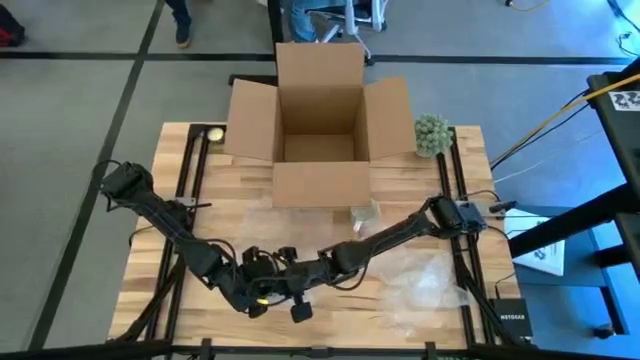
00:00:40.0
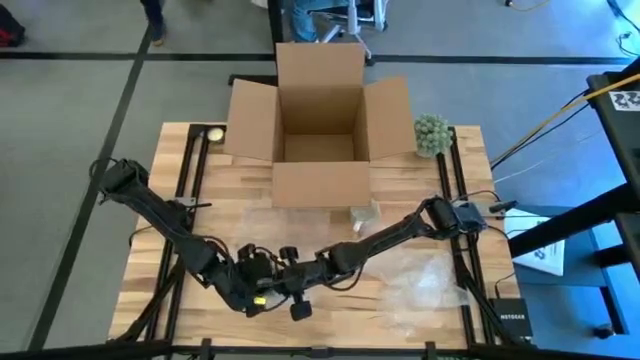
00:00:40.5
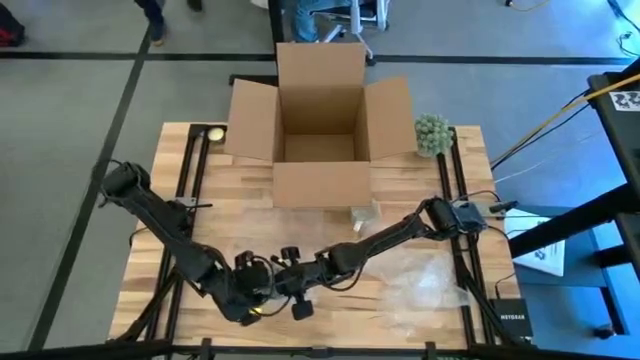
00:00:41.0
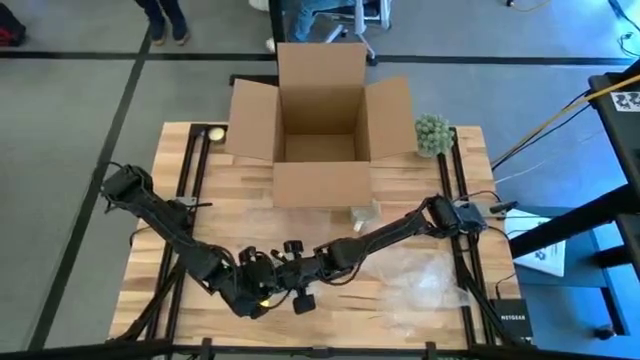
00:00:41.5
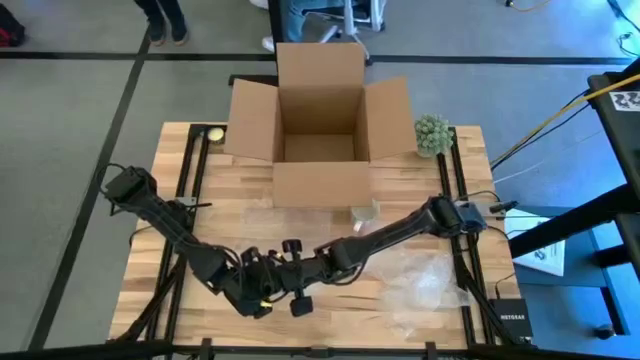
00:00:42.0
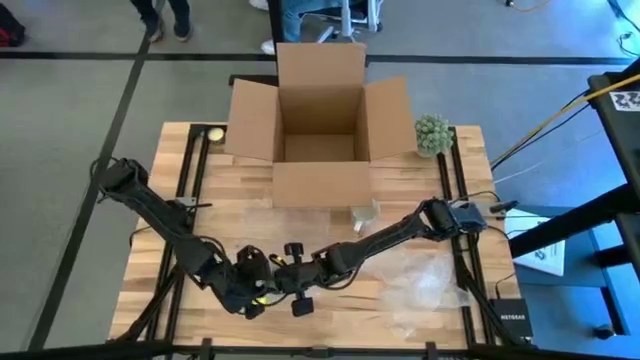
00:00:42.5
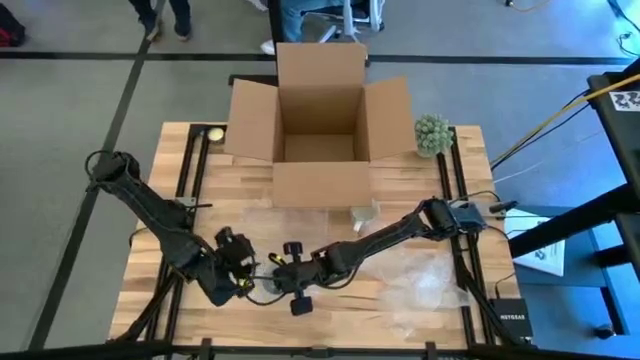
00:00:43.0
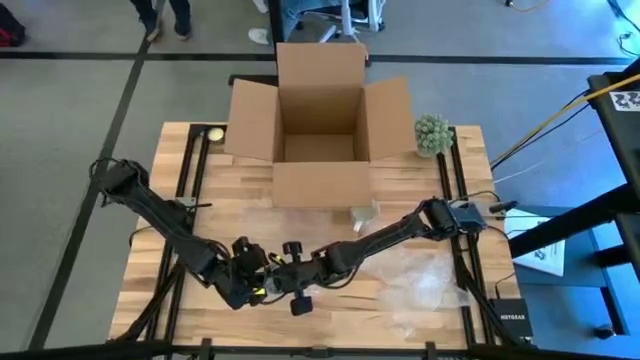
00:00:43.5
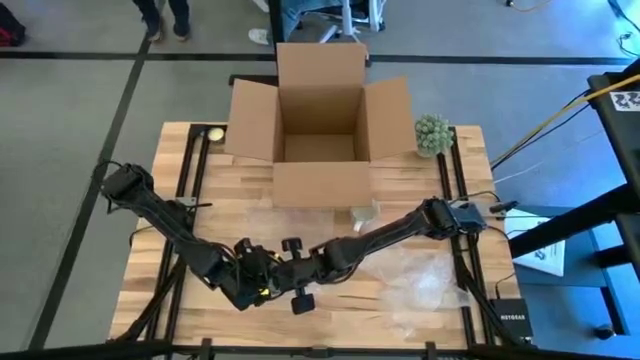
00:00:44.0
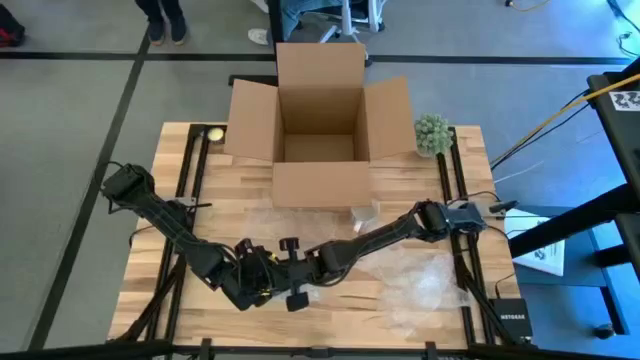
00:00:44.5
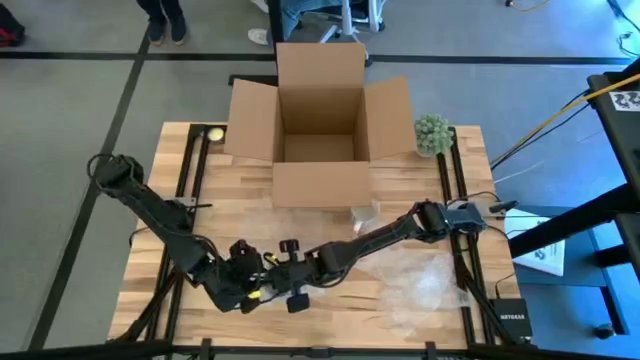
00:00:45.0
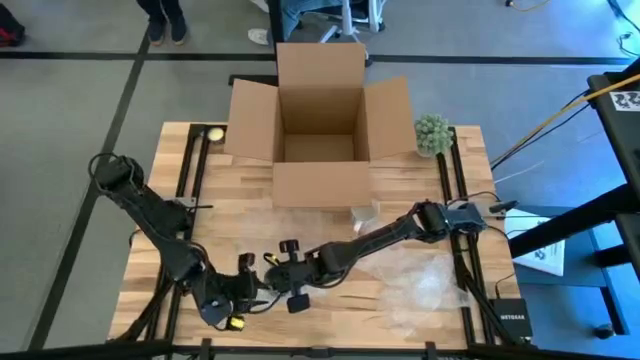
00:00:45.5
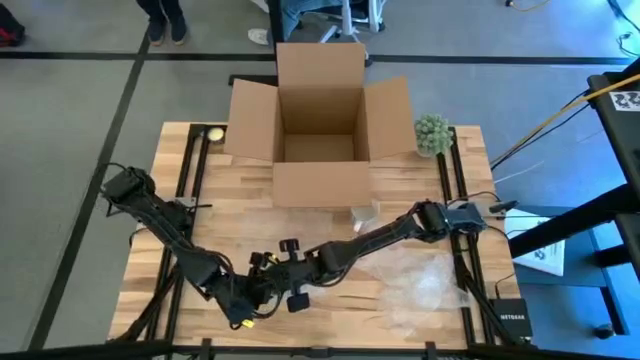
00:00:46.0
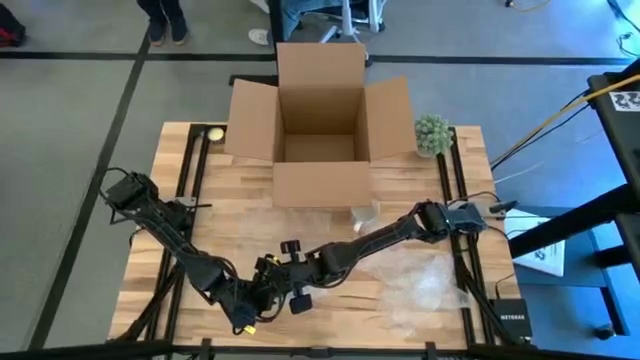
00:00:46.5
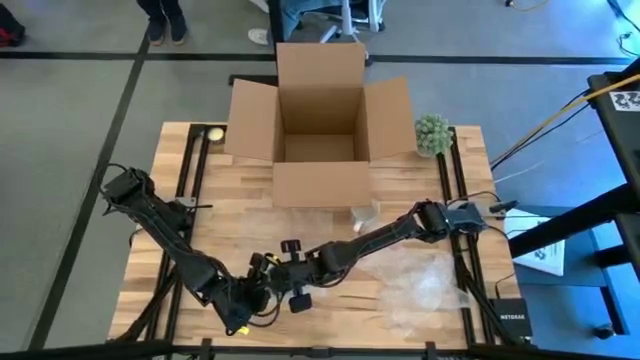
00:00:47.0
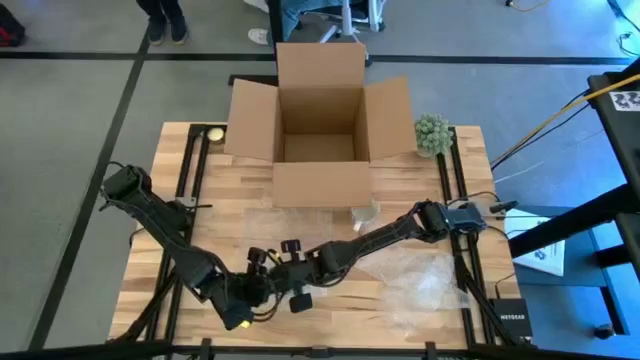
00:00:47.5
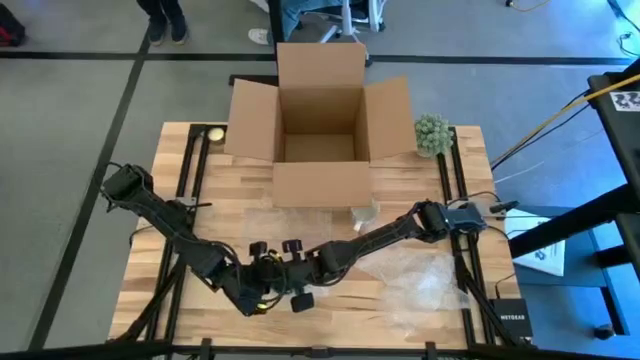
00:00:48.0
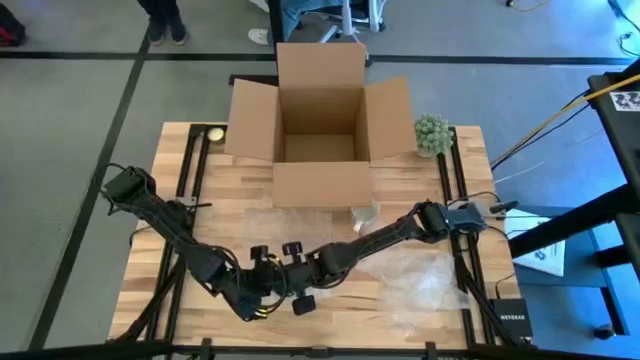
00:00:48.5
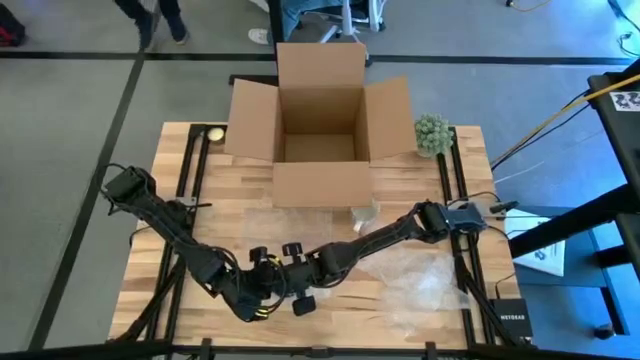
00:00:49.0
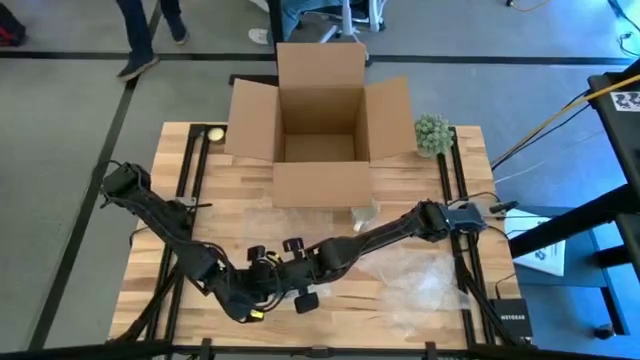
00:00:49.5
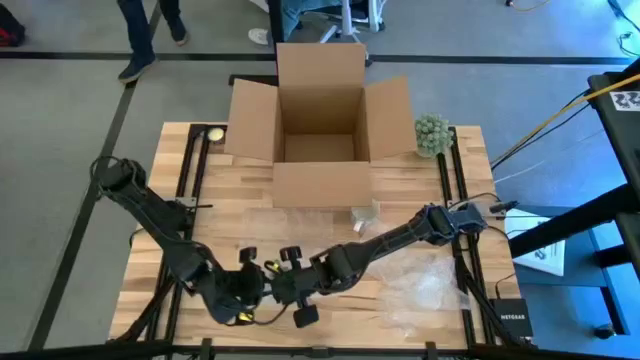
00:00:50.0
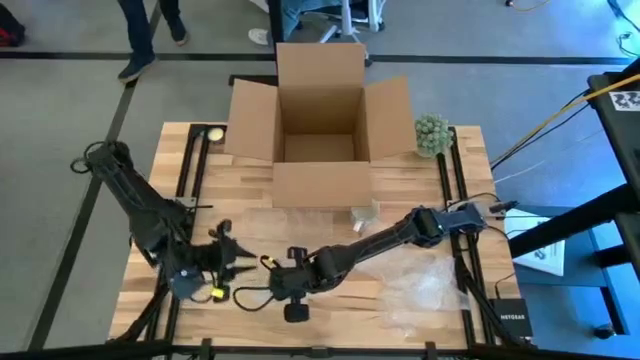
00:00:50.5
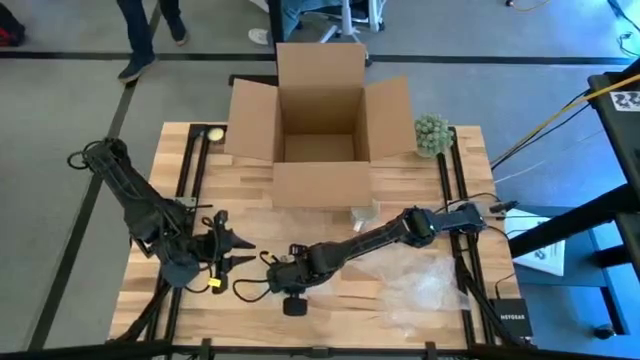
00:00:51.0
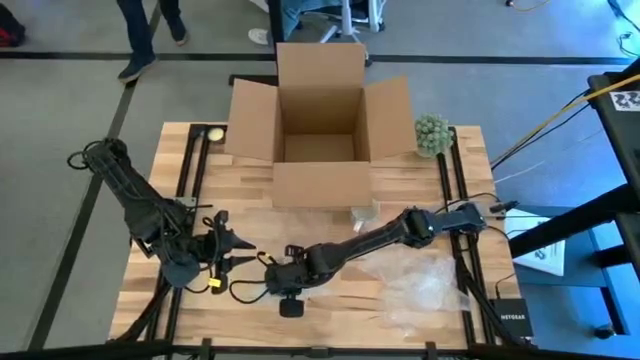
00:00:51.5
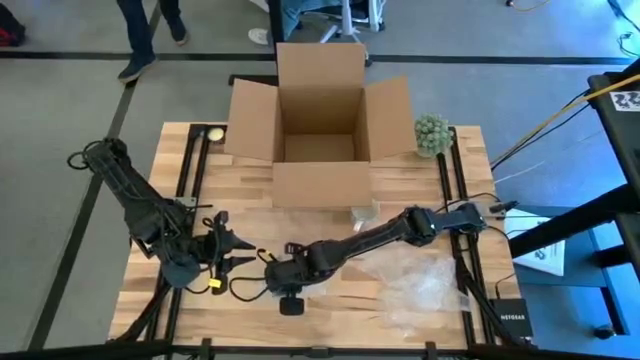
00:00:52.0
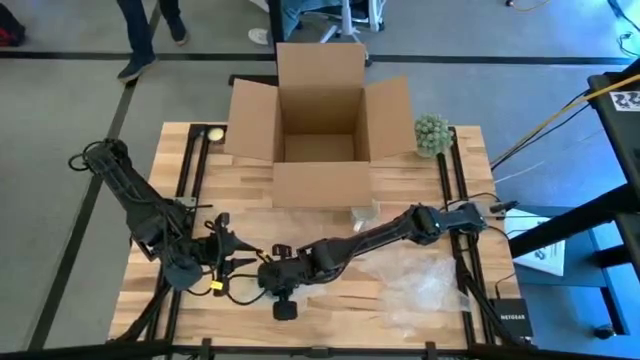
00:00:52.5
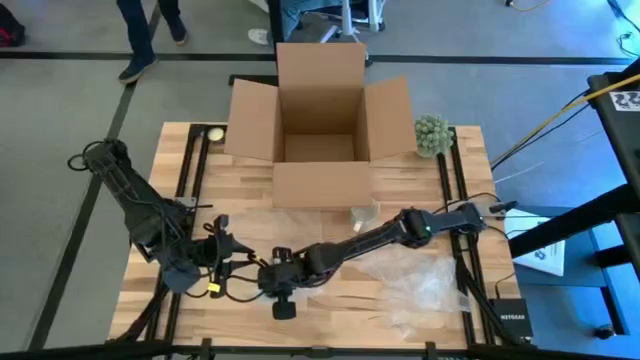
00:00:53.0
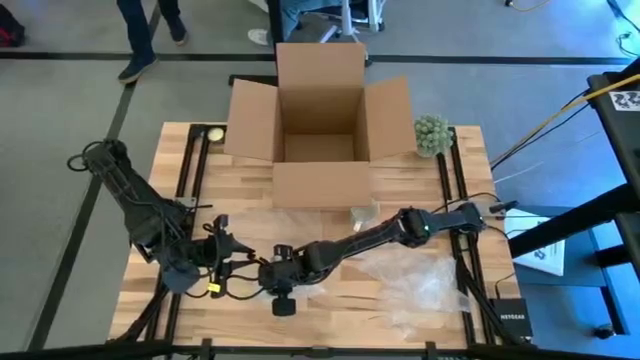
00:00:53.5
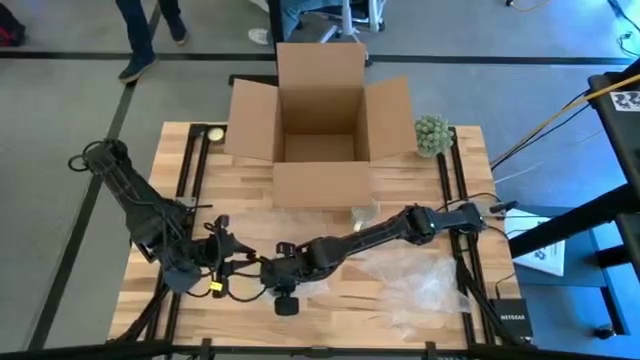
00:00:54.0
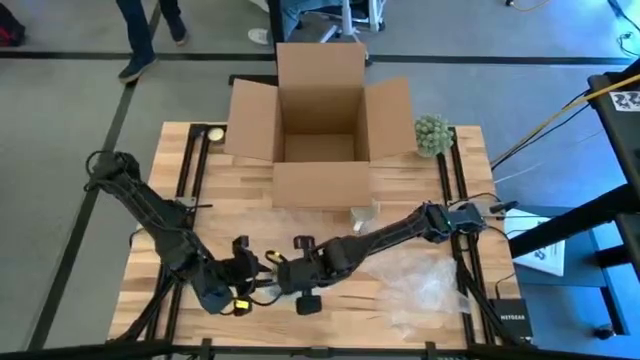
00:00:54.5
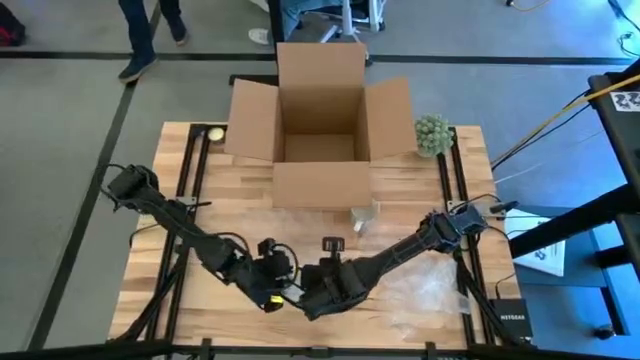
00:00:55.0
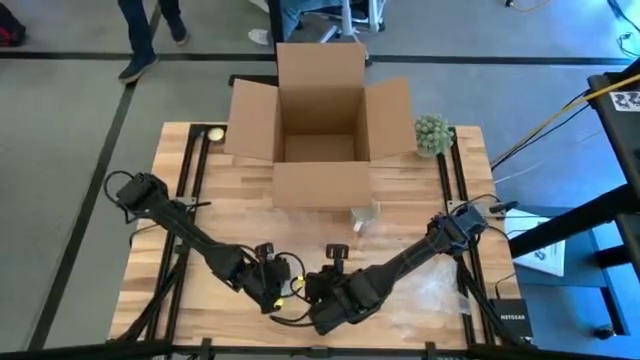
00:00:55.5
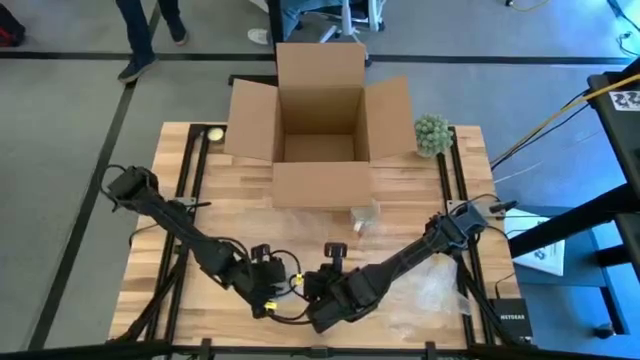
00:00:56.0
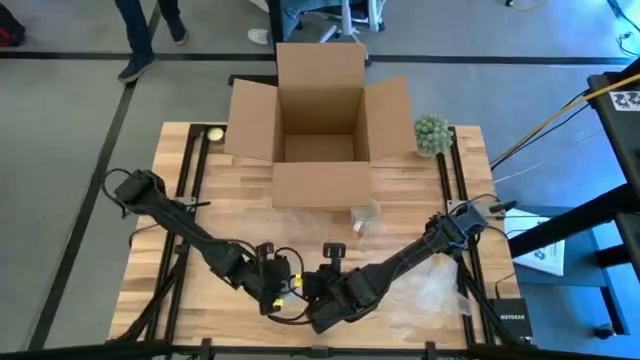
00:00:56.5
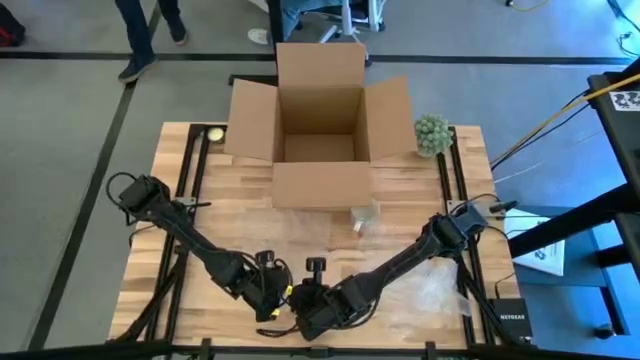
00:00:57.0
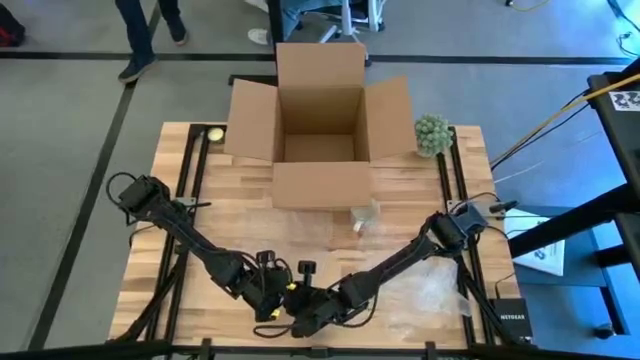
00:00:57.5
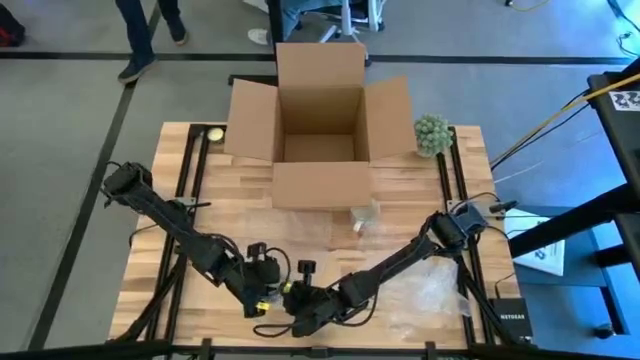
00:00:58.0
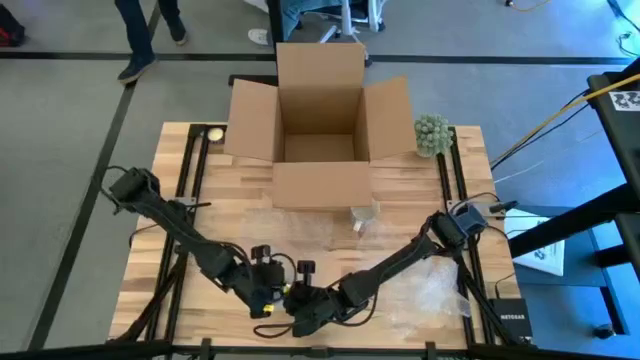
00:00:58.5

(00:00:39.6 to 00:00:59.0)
Task: wrap mug
Wrap the green mug with bubble wrap

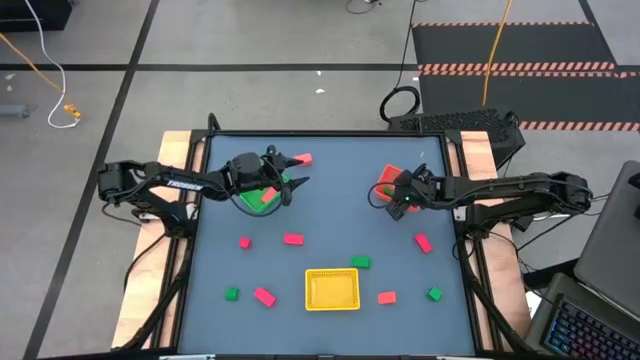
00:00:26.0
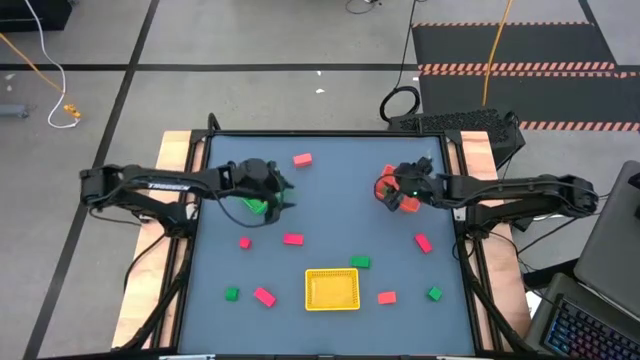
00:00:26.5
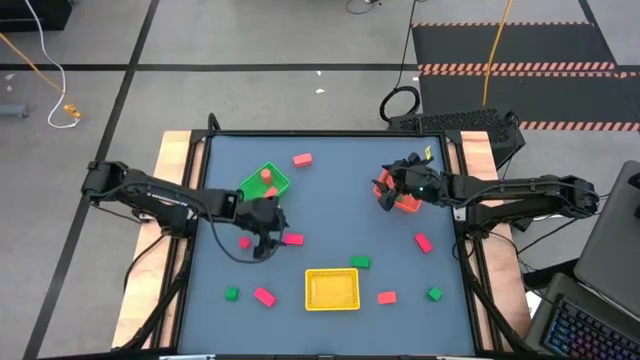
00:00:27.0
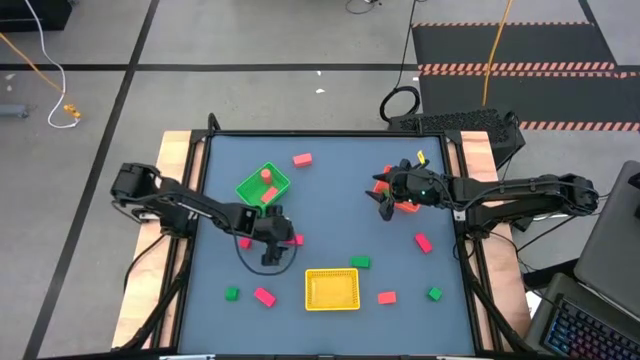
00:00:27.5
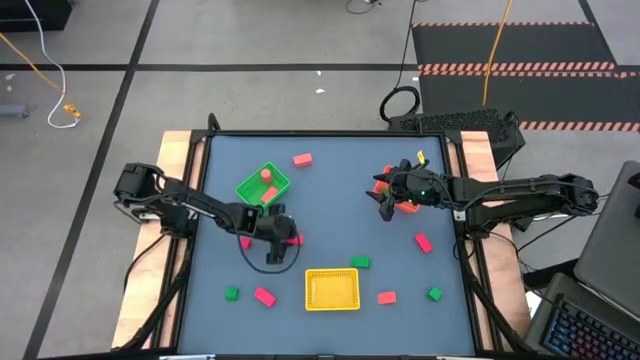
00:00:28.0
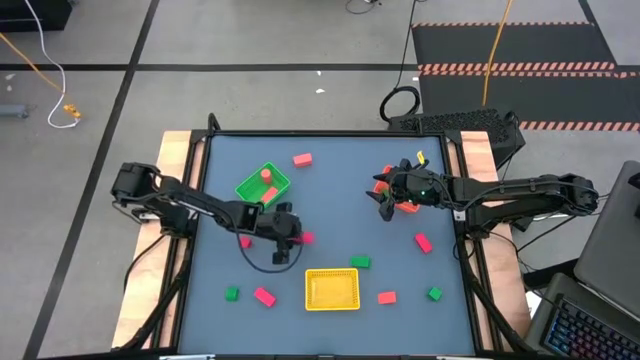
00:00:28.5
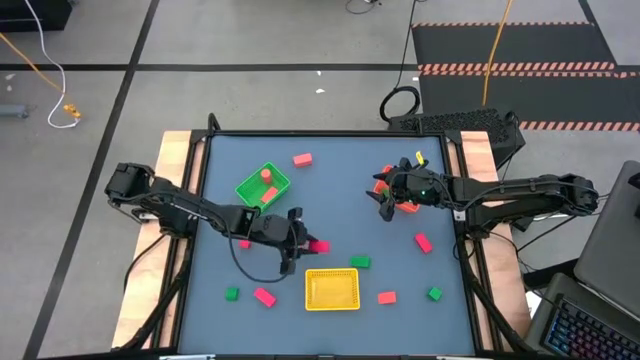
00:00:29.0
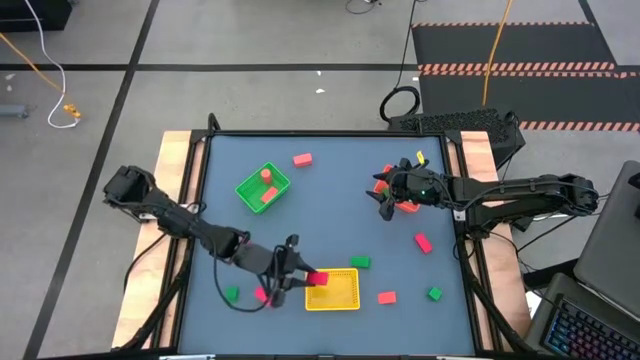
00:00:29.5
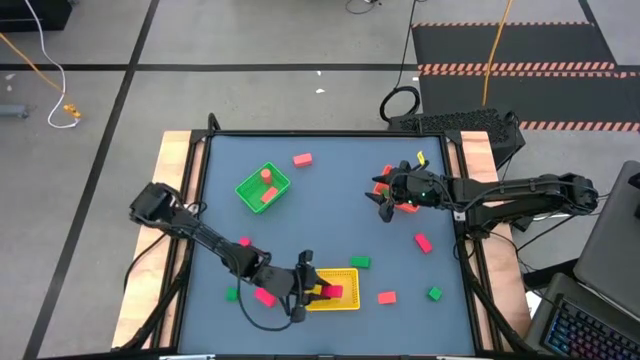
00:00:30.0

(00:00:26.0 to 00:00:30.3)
Task: Sort & place blocks by color
Put the red block into the yellow bin
